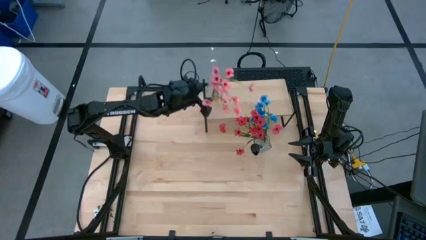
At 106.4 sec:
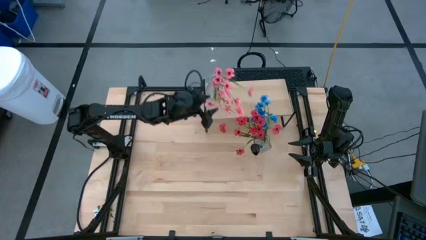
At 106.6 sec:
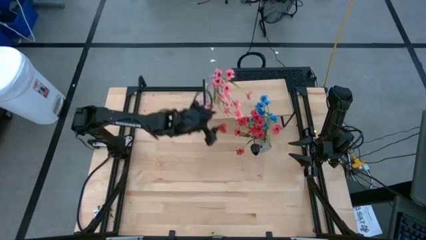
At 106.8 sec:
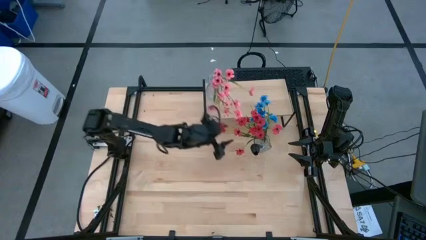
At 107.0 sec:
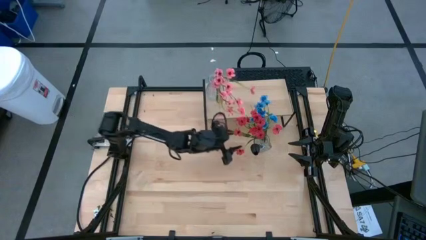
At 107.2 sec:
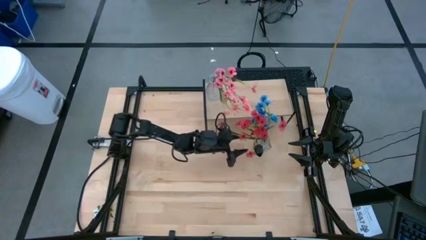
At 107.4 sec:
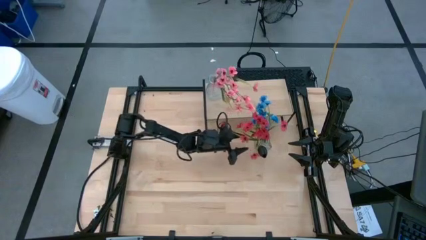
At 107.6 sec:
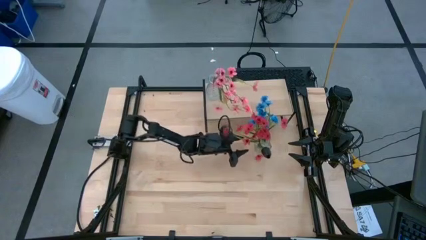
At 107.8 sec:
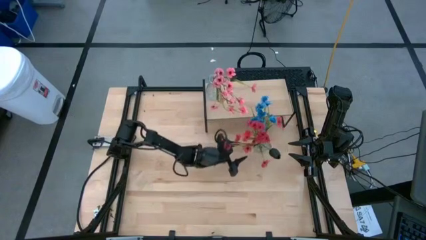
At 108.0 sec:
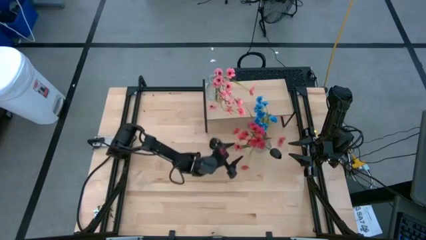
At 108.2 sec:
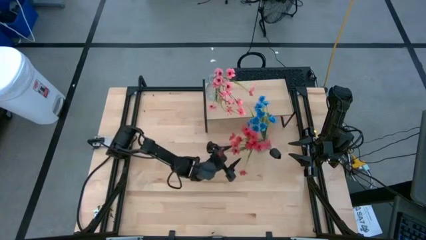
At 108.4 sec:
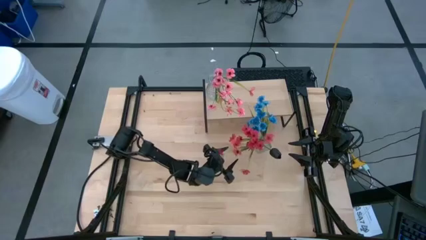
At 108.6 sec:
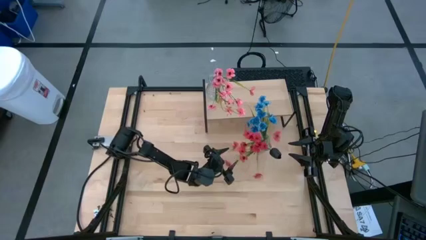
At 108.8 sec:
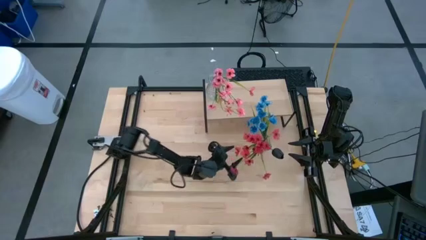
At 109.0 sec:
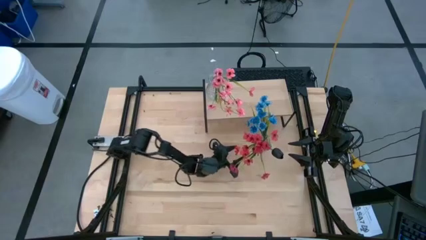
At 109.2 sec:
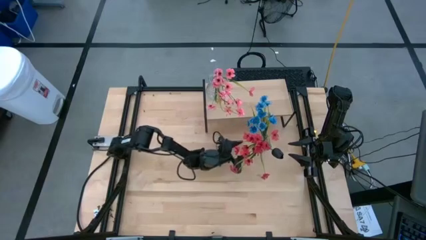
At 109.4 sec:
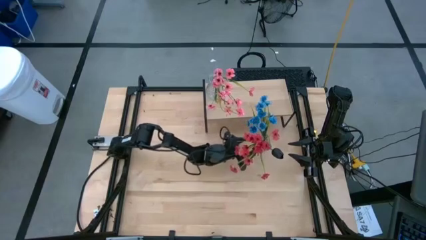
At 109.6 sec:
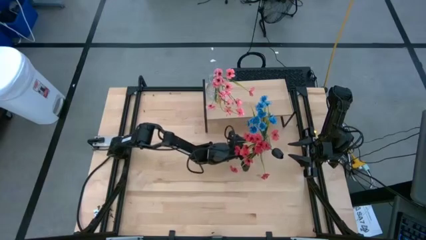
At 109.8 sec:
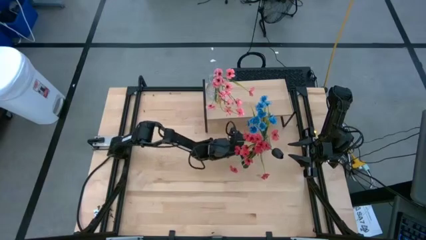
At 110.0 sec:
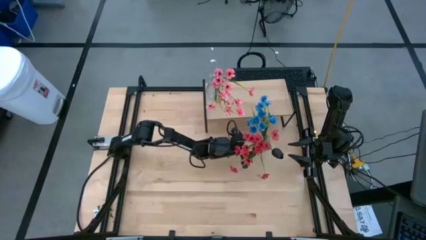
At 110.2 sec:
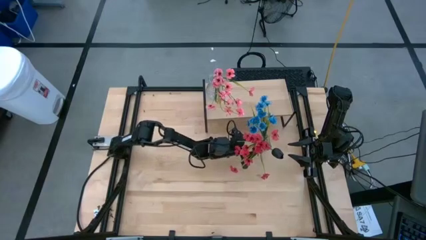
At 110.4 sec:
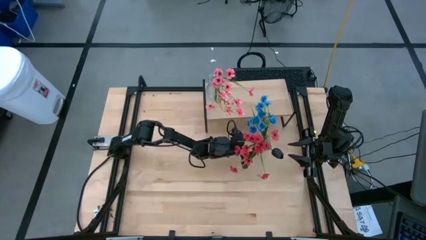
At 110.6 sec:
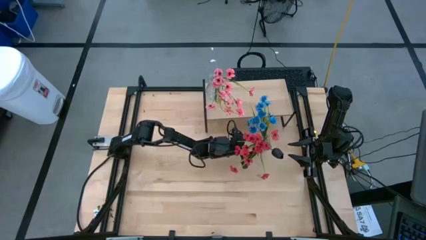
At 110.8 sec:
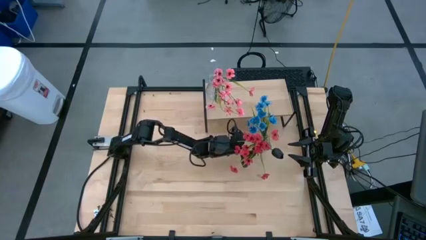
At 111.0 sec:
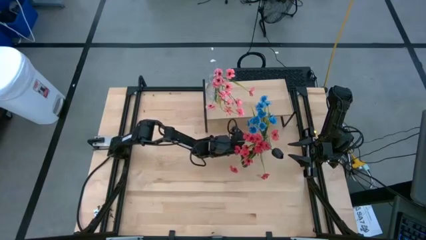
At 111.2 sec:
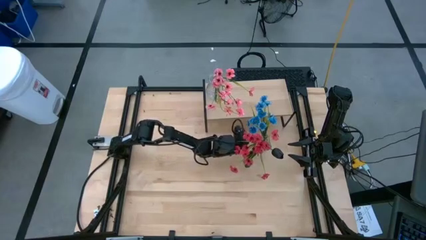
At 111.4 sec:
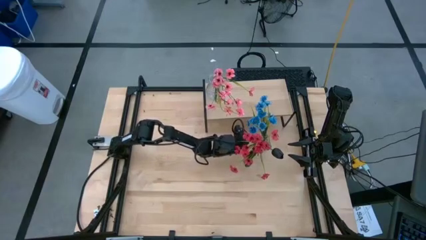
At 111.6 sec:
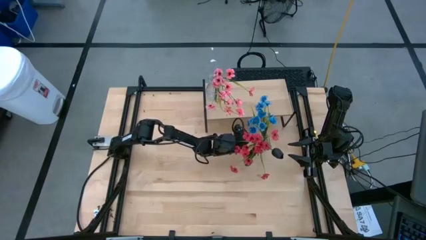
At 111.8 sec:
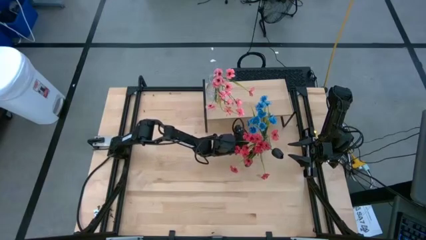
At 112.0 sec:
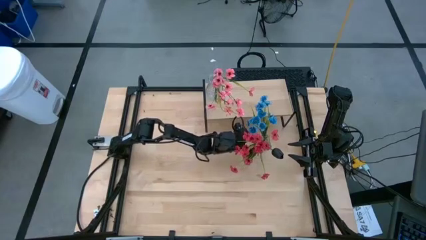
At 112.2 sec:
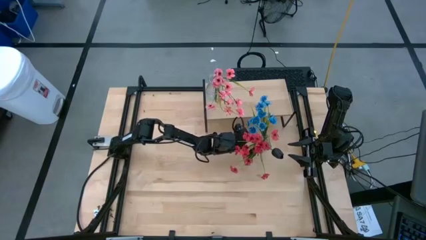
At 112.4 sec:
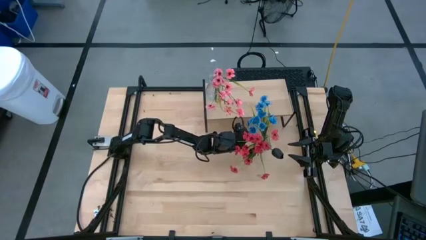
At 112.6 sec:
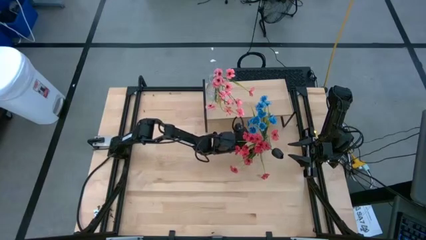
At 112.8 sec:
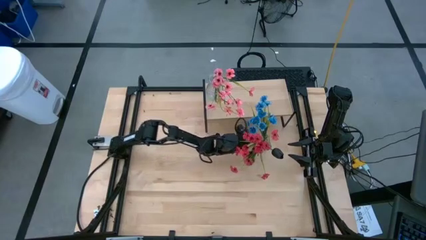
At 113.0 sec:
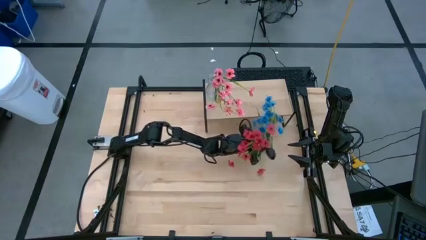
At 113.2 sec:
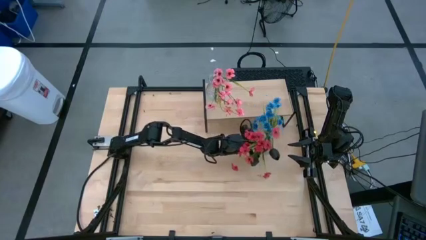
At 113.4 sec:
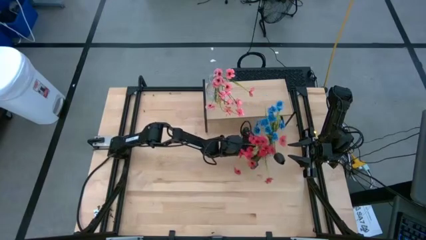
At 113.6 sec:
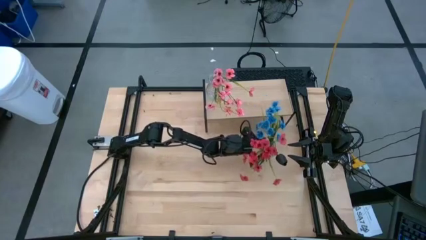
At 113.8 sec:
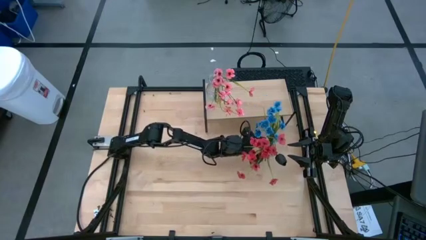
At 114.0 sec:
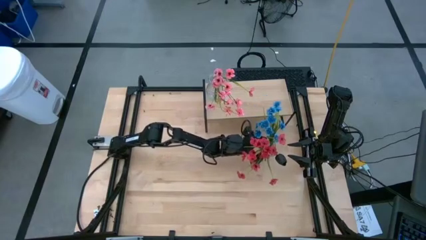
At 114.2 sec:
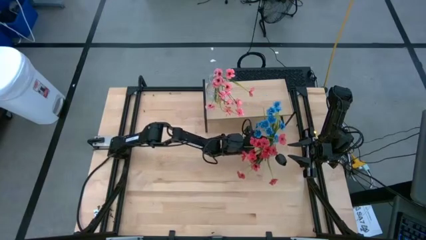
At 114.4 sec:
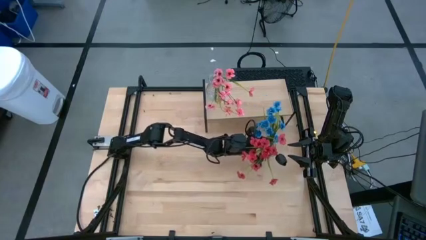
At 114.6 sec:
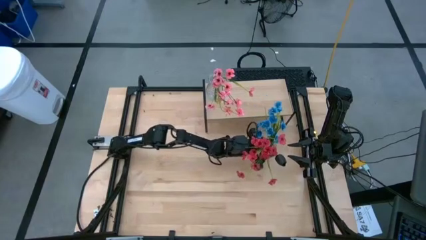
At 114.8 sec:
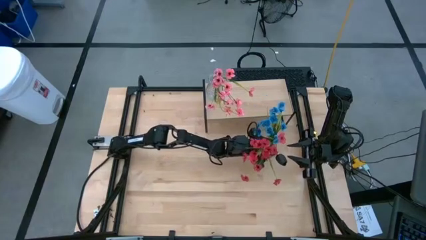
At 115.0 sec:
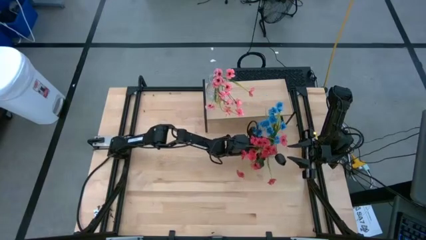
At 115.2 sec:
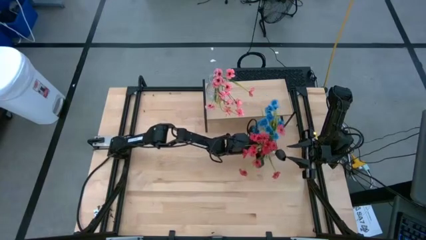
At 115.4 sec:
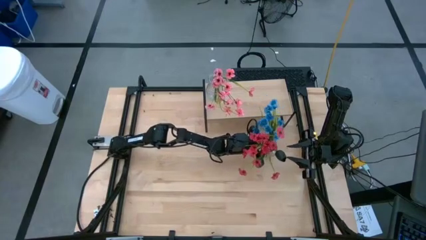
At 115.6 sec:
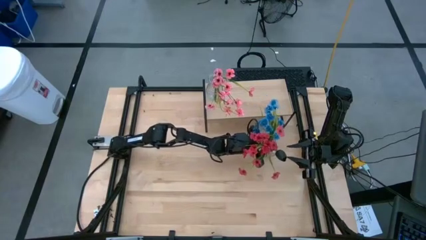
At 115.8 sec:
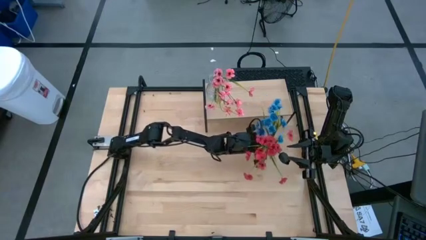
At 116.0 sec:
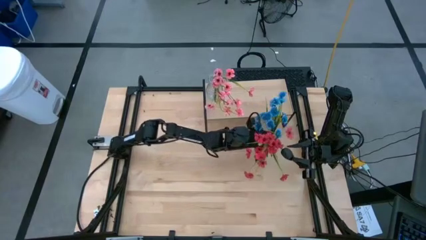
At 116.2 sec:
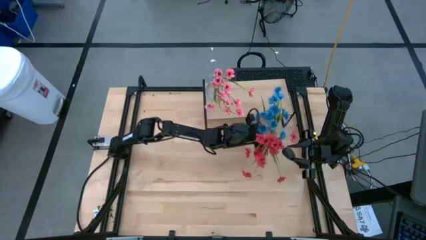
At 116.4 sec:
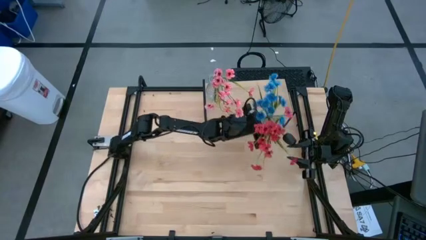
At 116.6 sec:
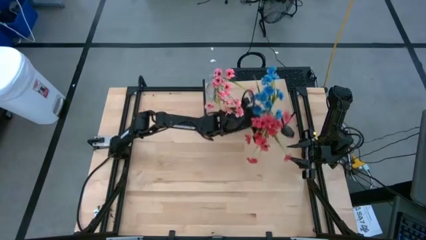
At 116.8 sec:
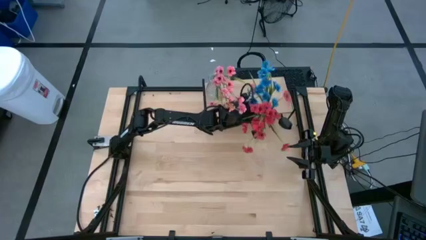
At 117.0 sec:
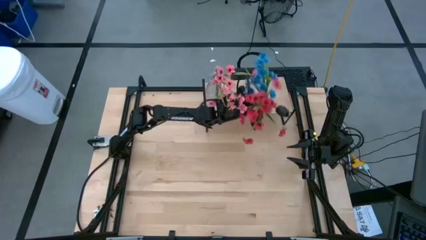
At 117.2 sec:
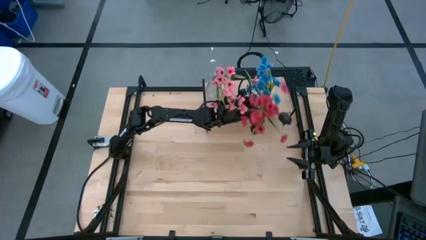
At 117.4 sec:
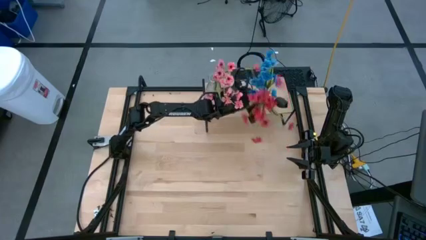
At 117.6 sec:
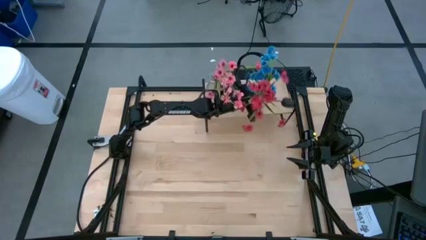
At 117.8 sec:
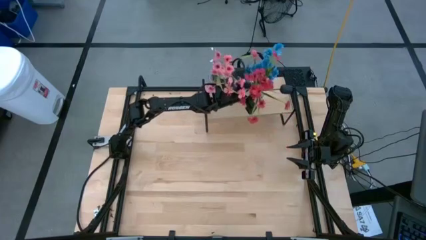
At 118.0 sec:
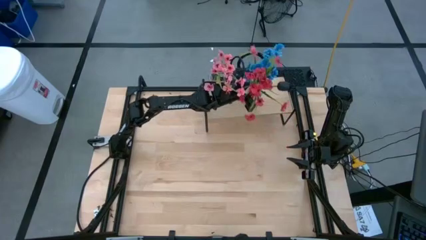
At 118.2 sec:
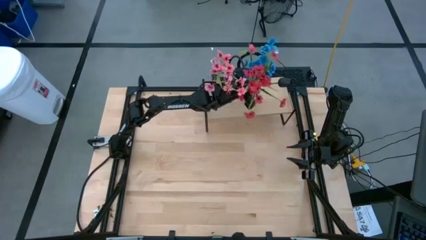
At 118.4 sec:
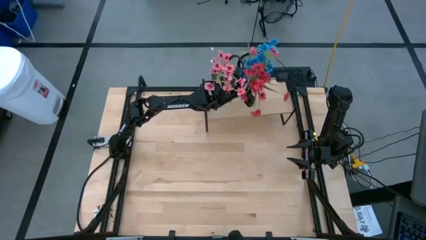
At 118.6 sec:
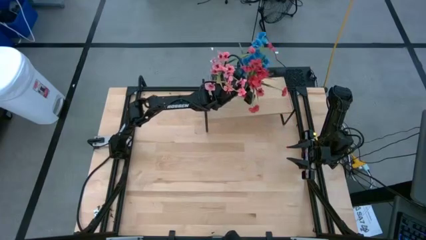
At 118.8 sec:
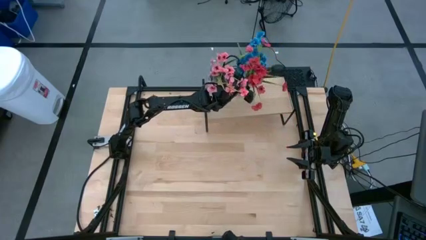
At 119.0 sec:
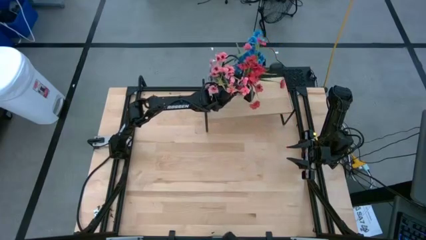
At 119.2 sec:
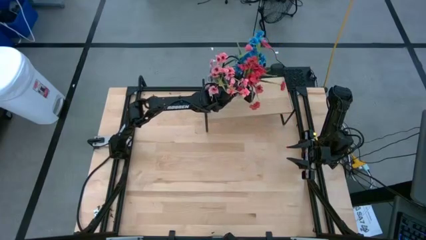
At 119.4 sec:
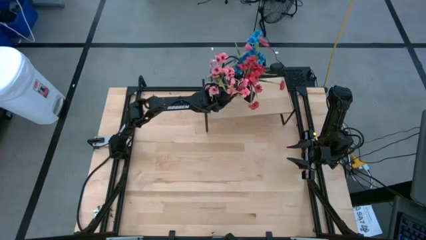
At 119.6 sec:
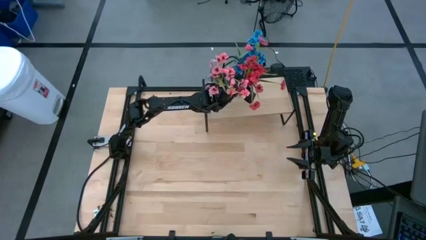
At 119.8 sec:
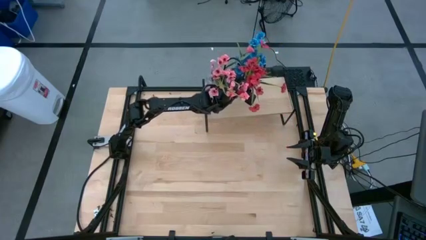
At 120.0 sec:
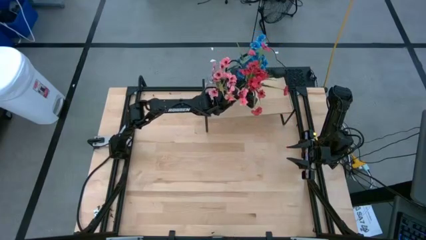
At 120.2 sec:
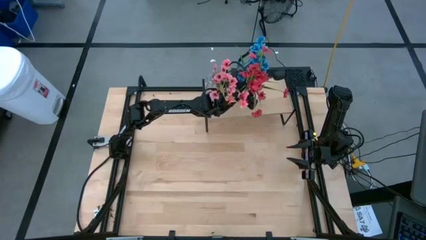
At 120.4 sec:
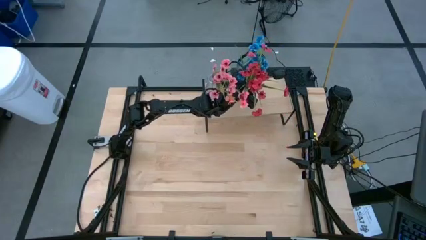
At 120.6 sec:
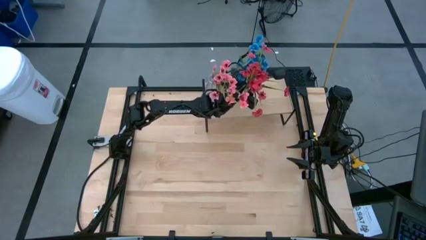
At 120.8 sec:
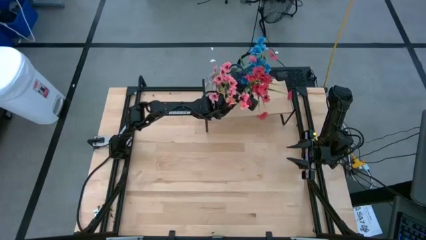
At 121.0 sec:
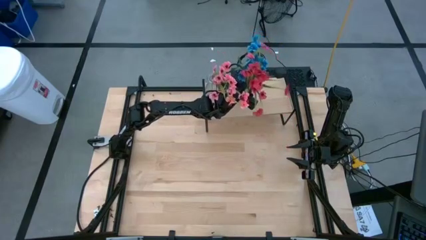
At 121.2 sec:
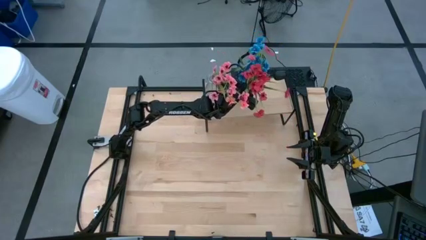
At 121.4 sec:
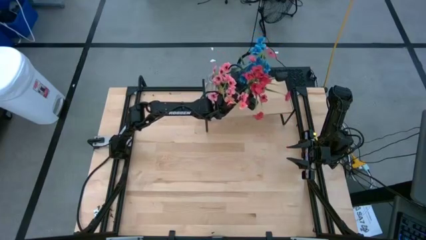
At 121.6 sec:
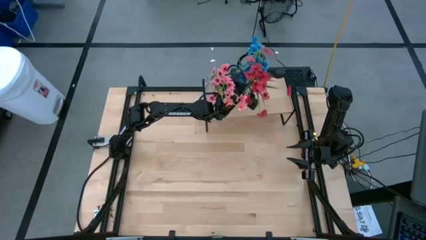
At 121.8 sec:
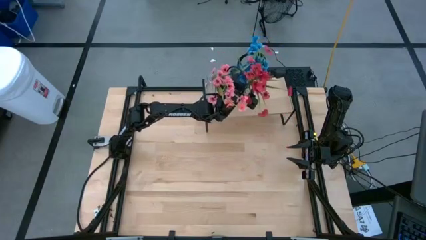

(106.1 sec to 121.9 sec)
Task: Pick and place flowers into a vace then onto a shelf
Put the transparent flower vase on the shelf
